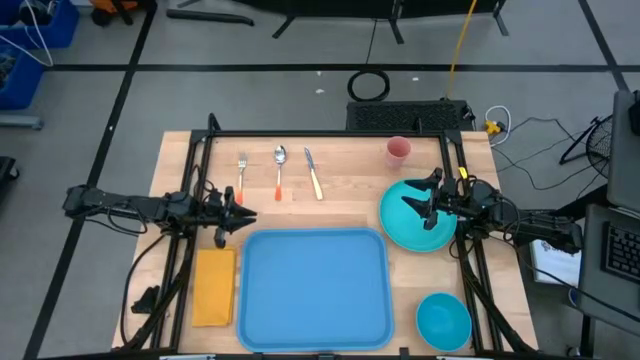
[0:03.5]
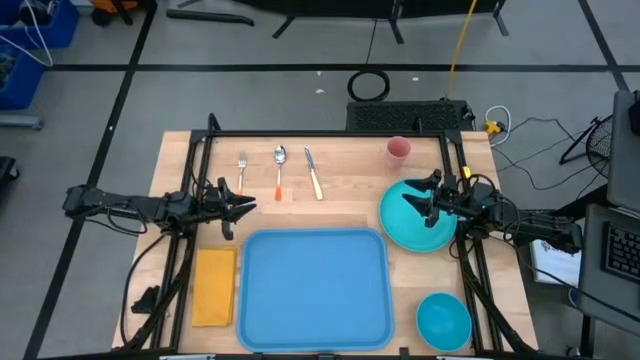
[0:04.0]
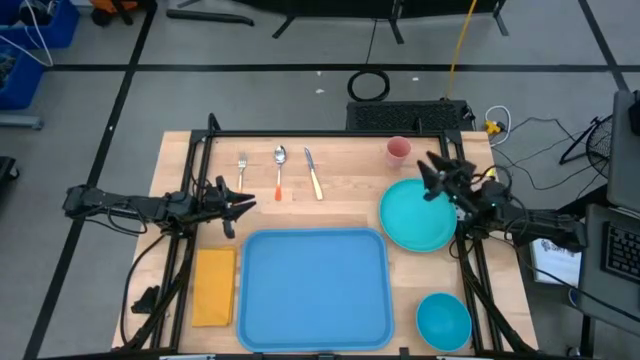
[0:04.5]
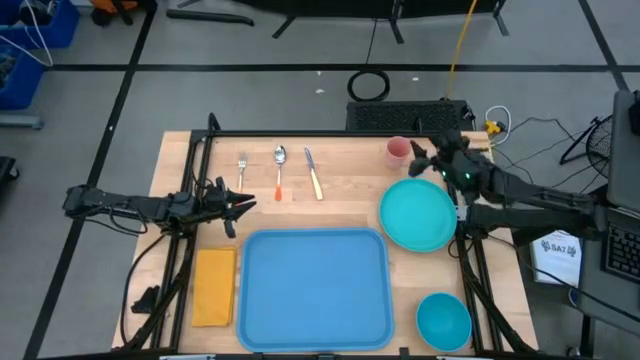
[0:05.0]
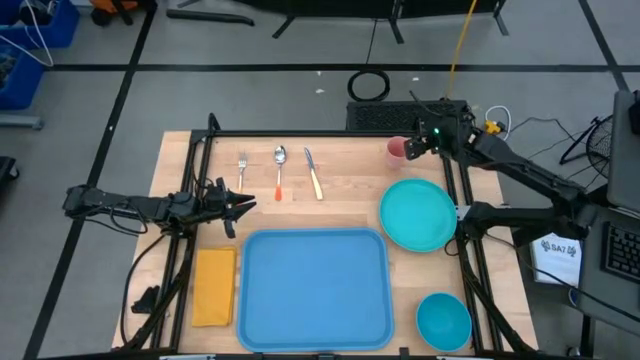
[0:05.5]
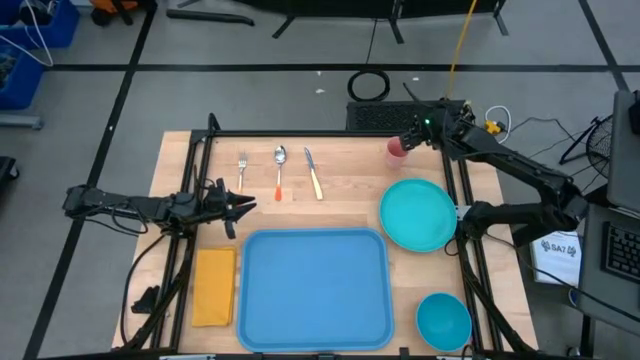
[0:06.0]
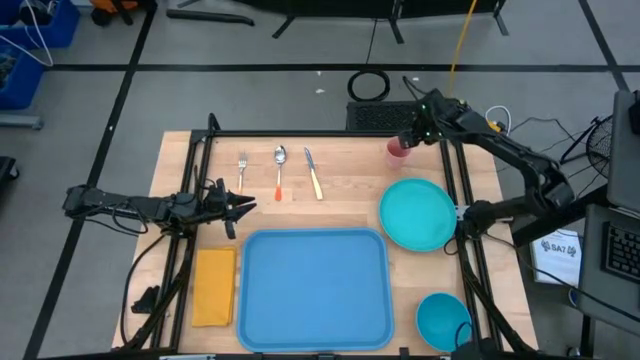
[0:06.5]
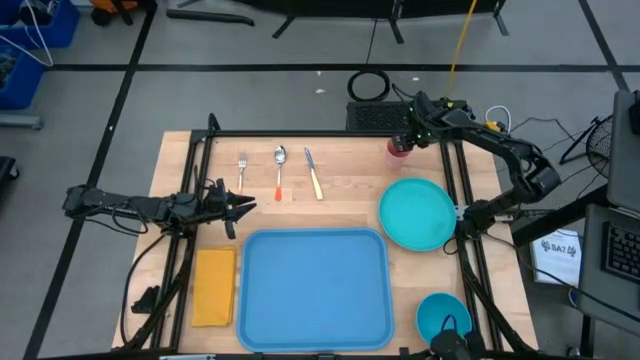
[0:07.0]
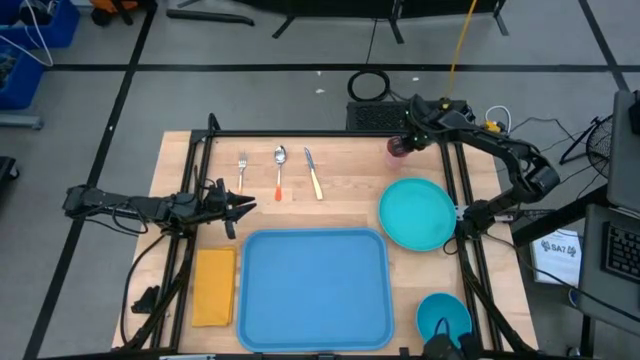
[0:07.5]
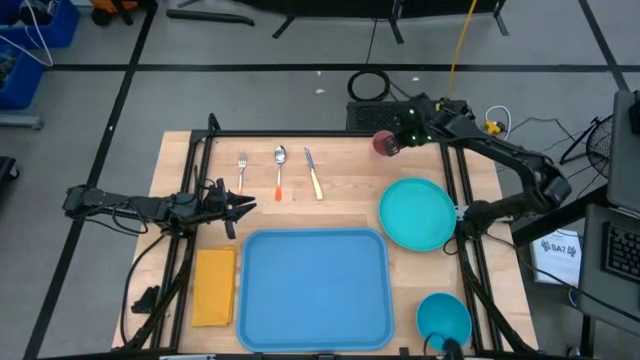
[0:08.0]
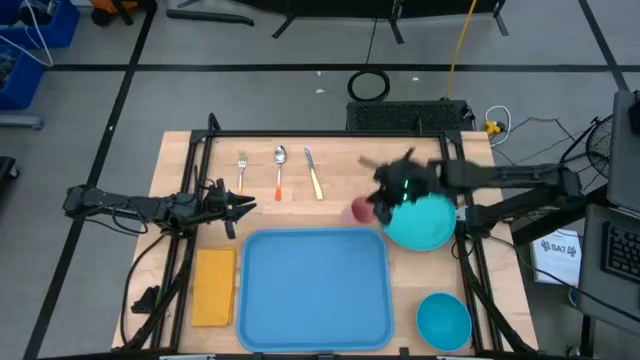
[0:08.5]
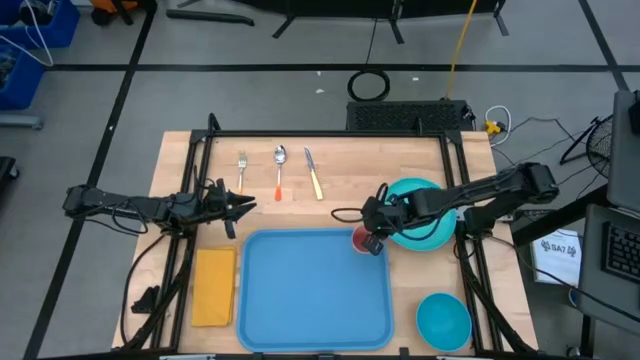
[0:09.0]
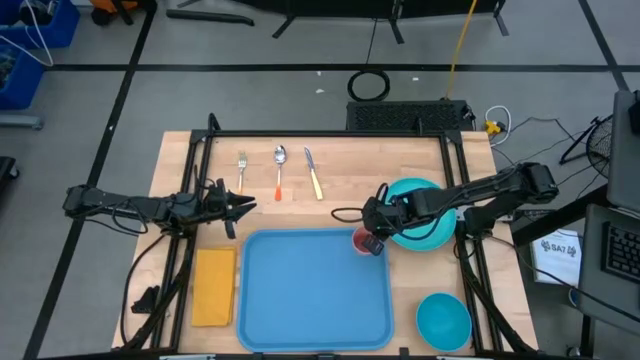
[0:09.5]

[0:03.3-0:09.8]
Task: Set up tray
Put the pink cup on the blue serving tray

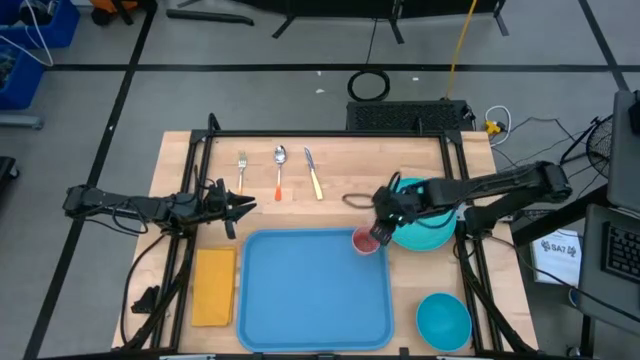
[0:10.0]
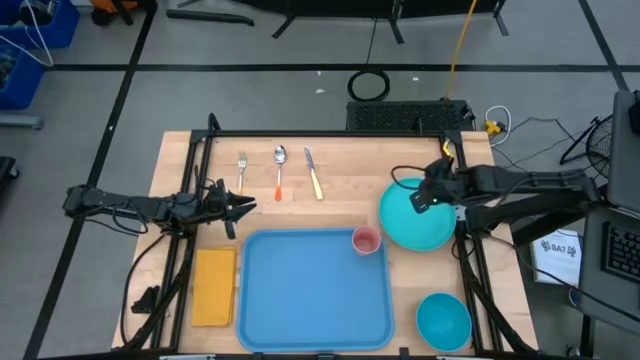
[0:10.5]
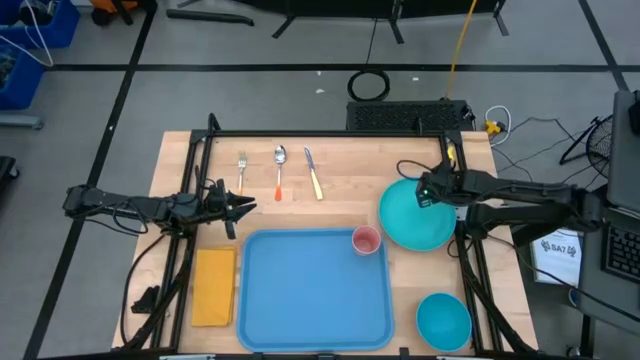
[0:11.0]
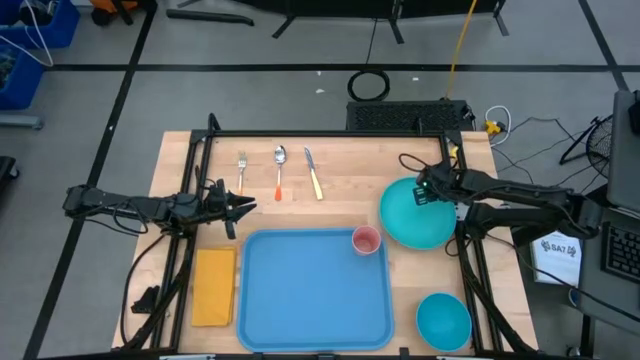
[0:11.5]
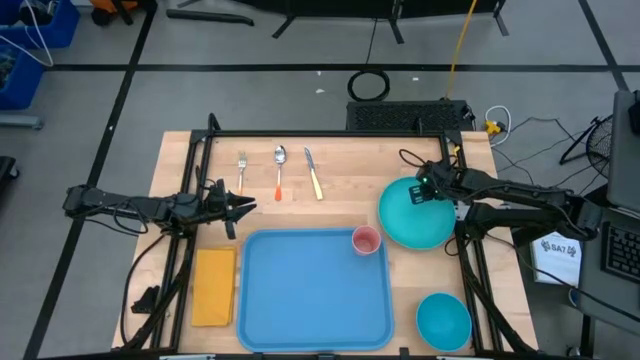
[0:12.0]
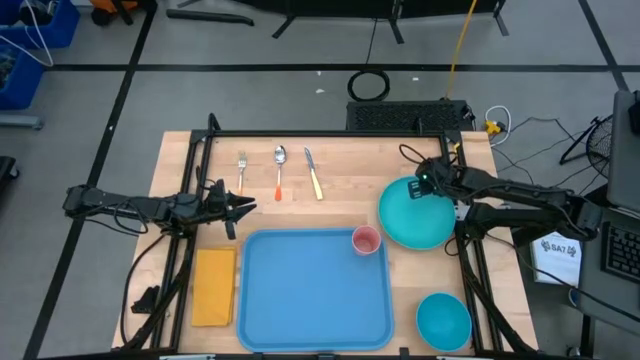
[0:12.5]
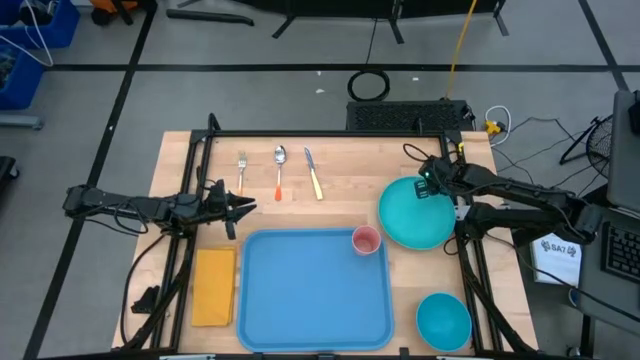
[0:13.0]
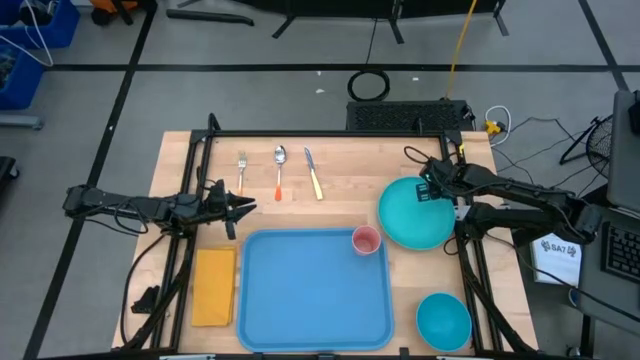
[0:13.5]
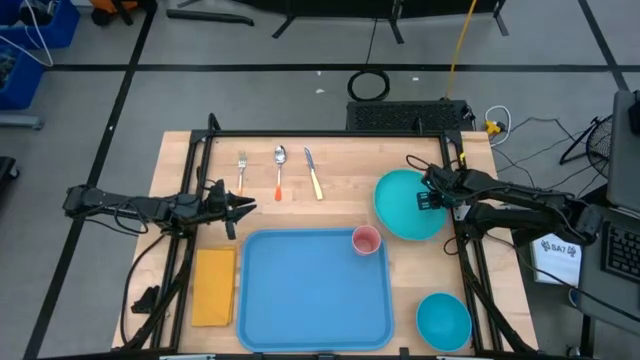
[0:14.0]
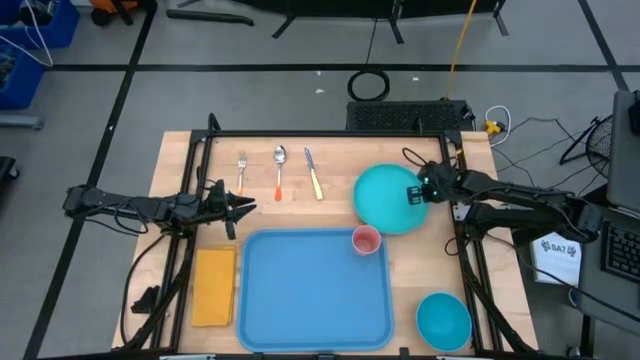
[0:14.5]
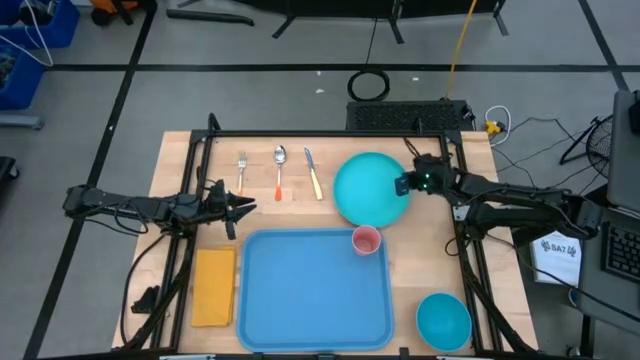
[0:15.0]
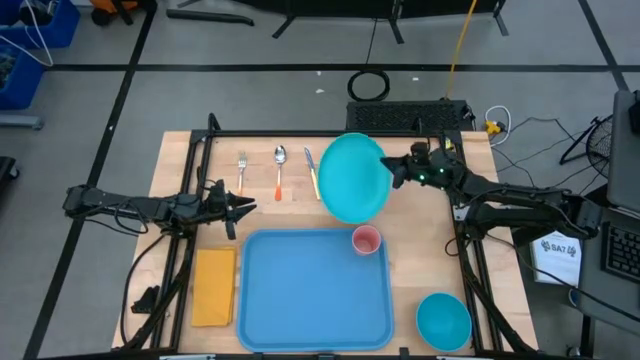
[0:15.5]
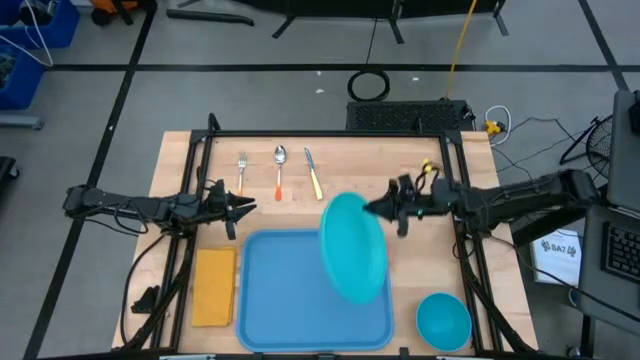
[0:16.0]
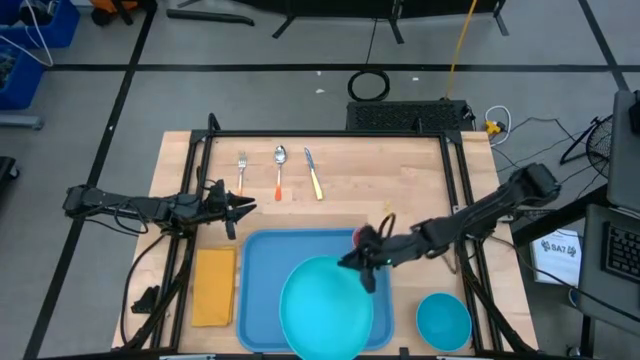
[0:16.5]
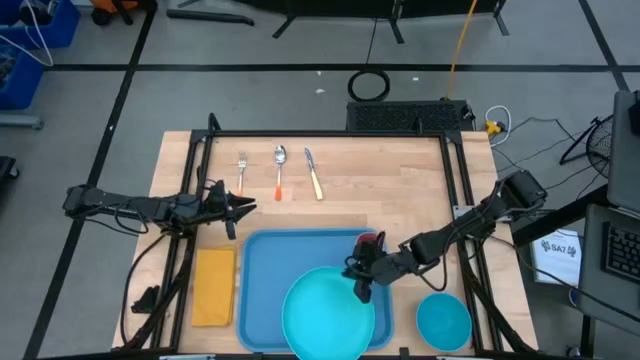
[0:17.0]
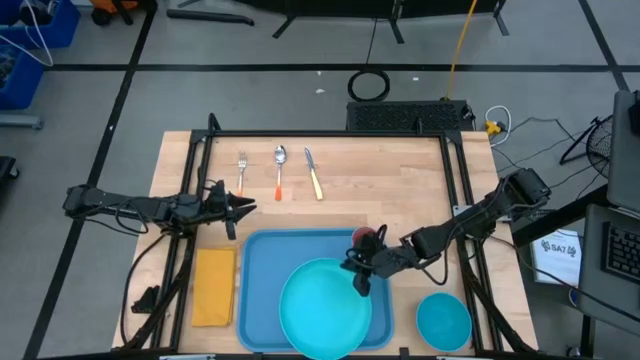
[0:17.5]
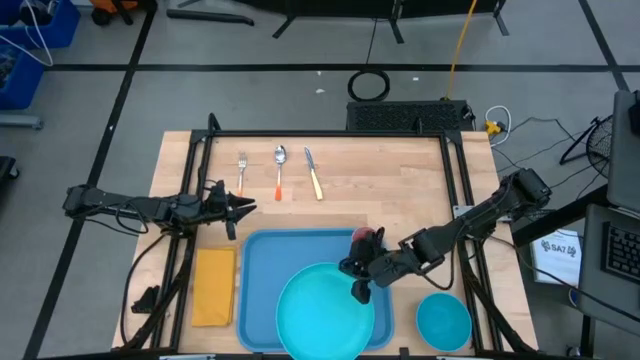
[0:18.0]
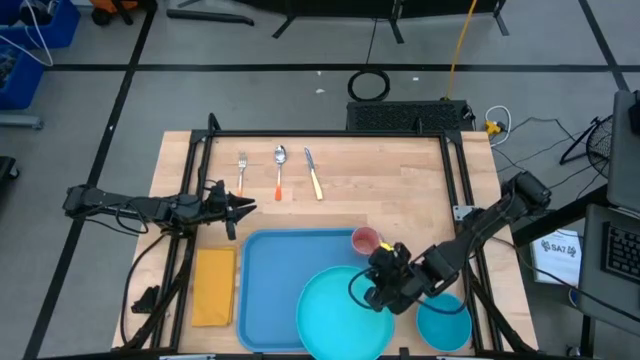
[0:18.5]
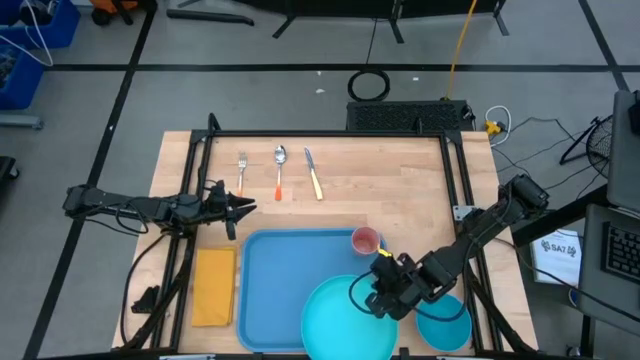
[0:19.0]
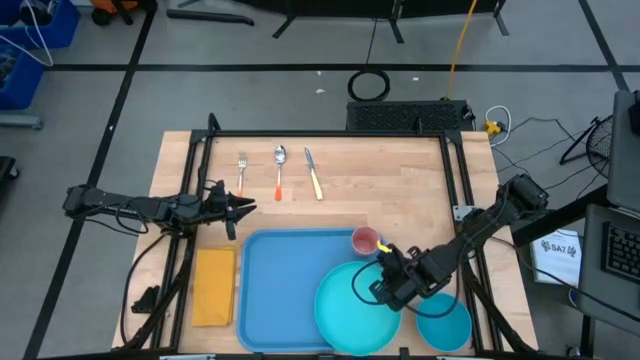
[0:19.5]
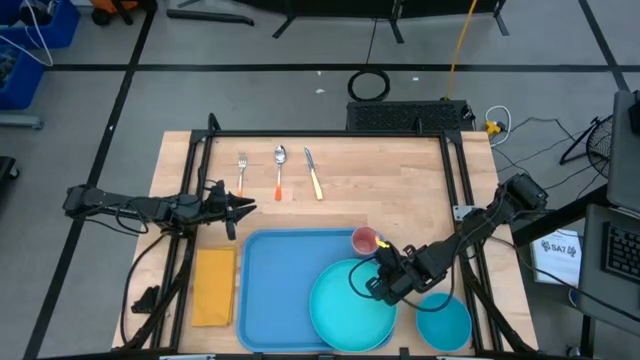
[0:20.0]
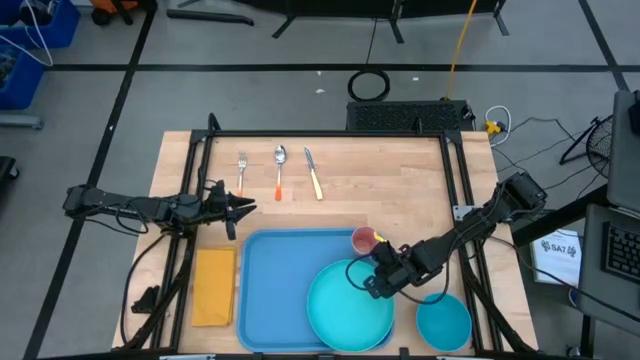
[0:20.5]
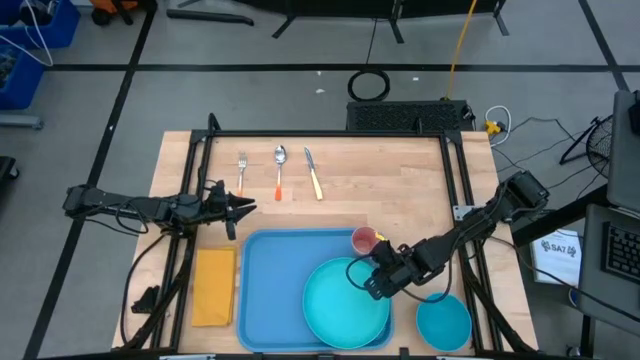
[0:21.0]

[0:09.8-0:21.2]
Put the blue plate on the blue serving tray

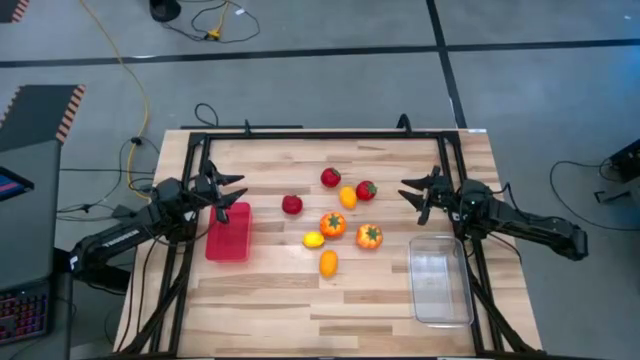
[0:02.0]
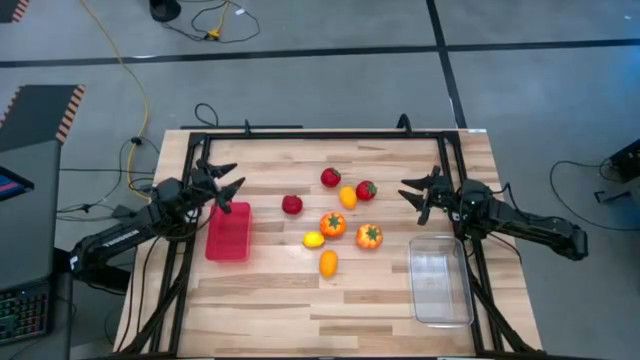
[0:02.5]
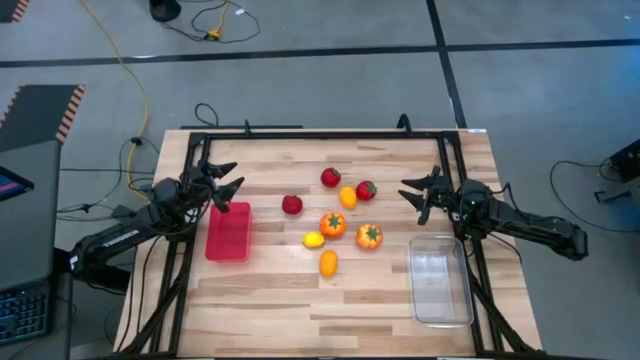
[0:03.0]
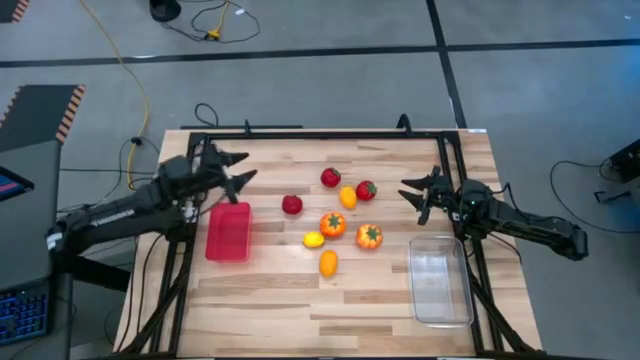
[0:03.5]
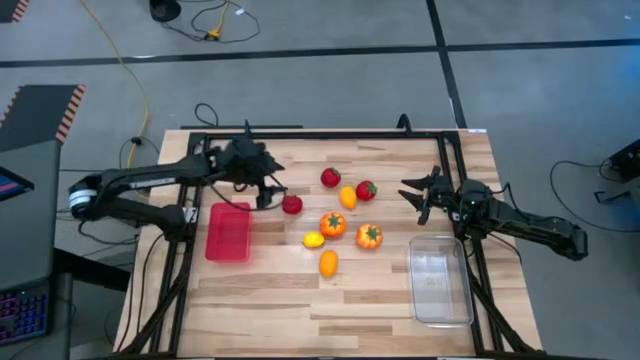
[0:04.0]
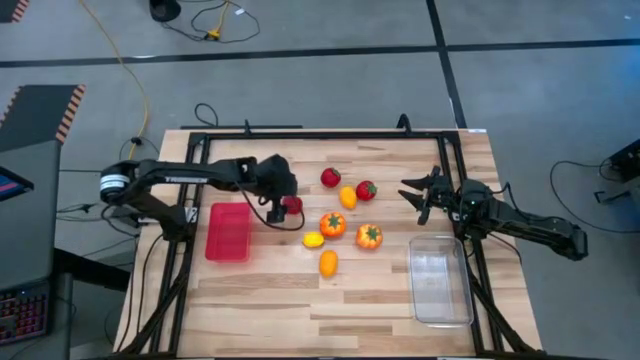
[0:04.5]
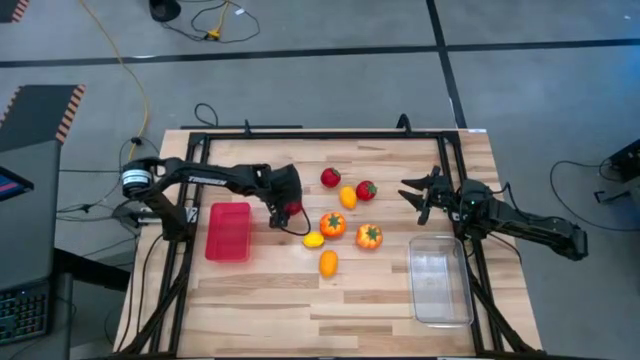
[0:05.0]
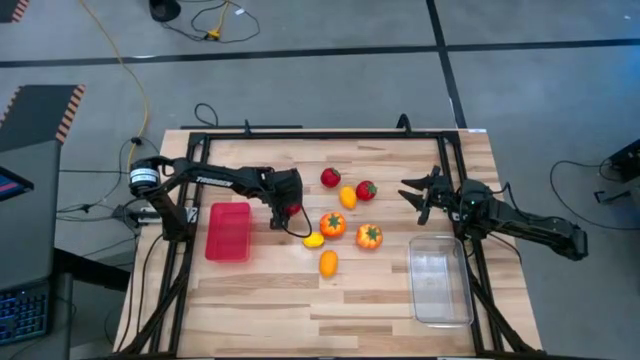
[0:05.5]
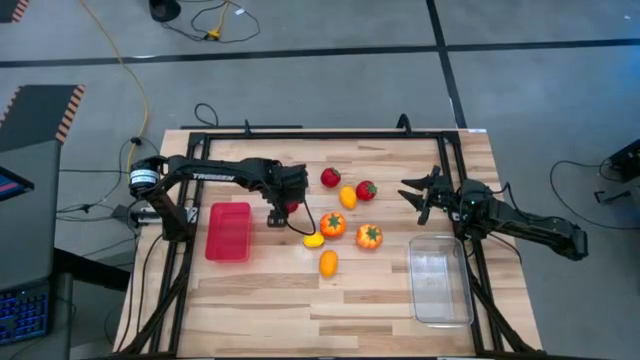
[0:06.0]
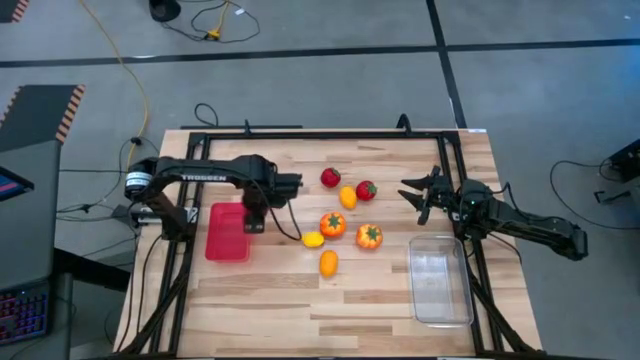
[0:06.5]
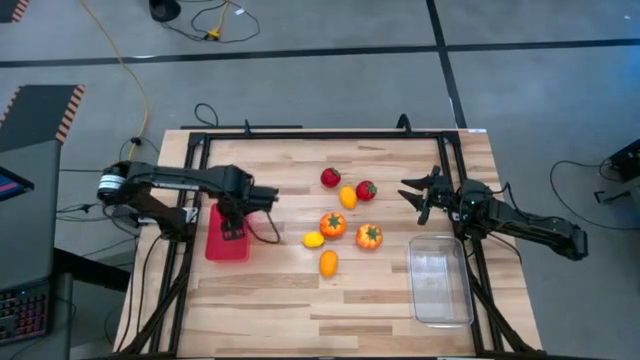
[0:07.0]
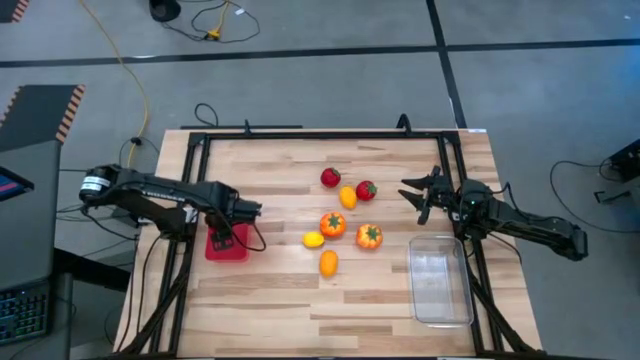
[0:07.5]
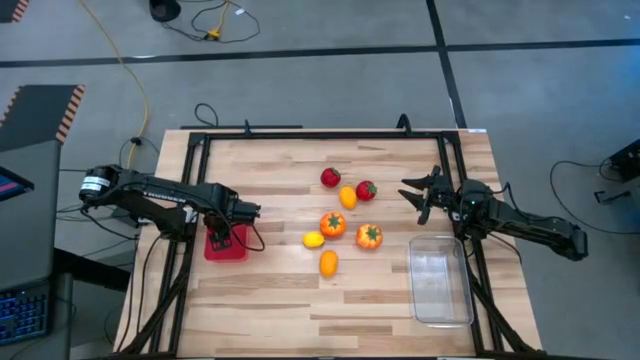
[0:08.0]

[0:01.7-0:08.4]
Task: Sort produce into baskets
Put the left red tomato into the red bin
